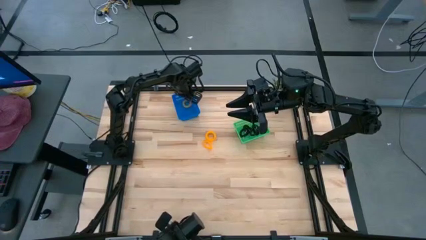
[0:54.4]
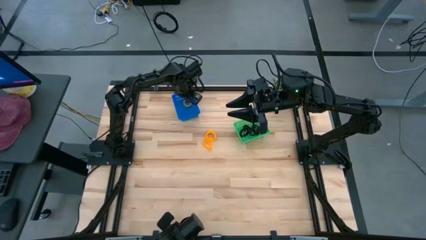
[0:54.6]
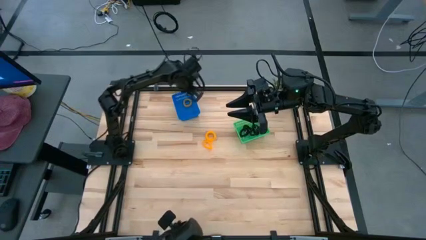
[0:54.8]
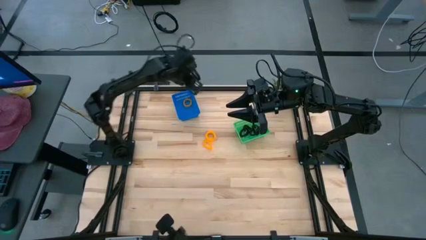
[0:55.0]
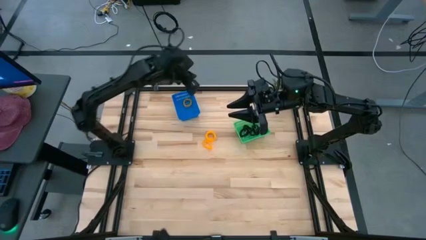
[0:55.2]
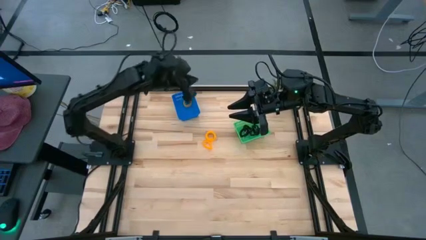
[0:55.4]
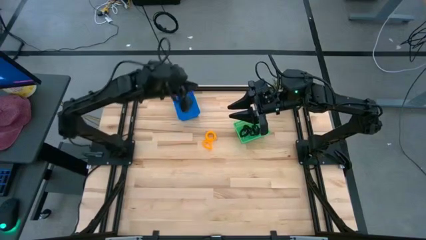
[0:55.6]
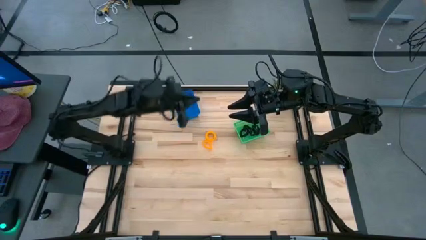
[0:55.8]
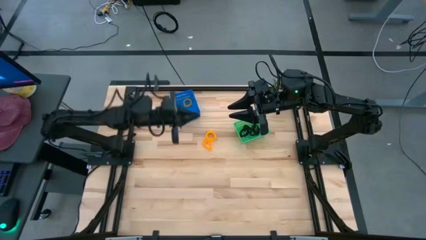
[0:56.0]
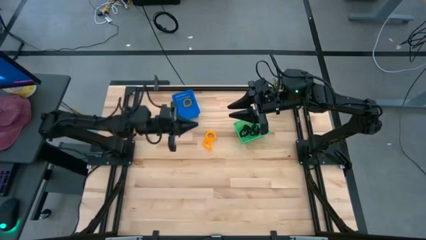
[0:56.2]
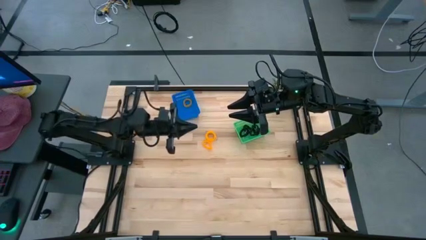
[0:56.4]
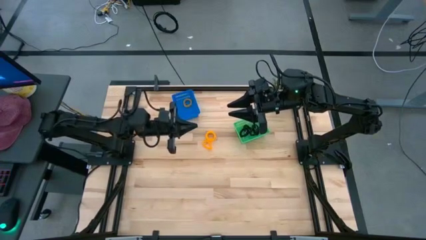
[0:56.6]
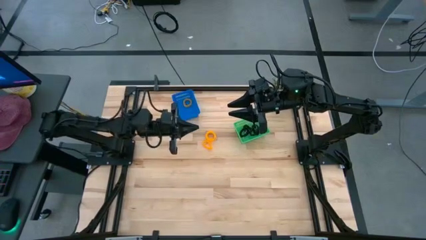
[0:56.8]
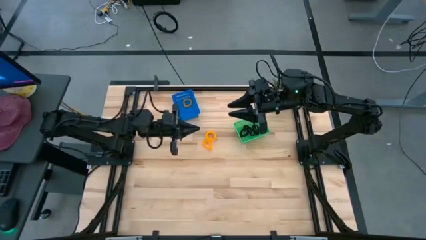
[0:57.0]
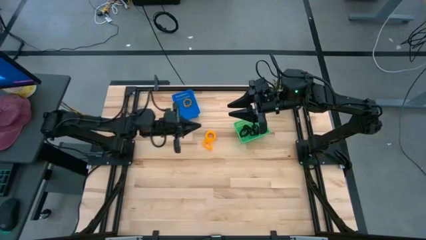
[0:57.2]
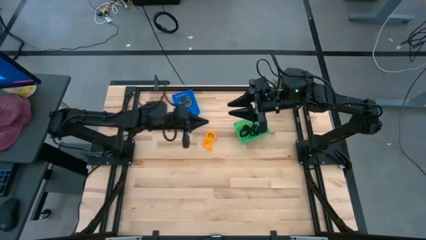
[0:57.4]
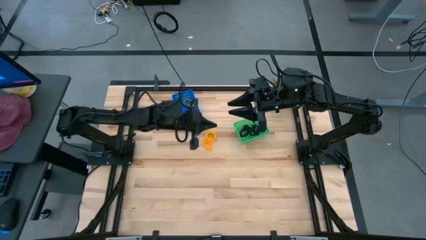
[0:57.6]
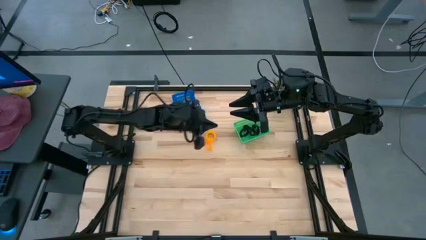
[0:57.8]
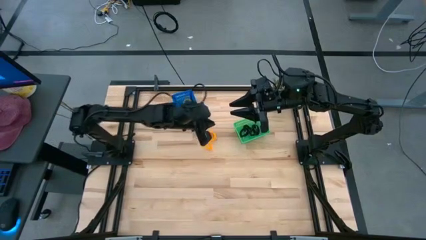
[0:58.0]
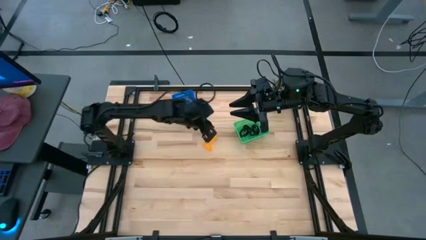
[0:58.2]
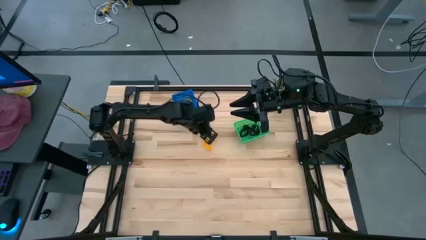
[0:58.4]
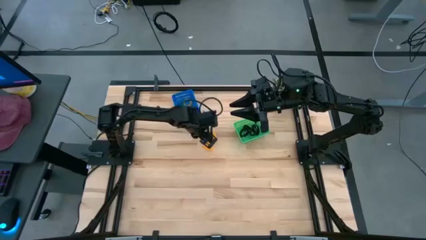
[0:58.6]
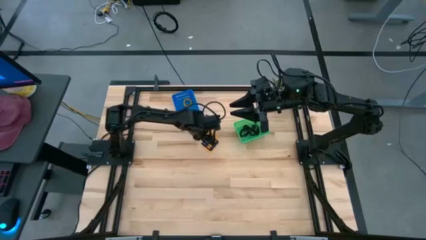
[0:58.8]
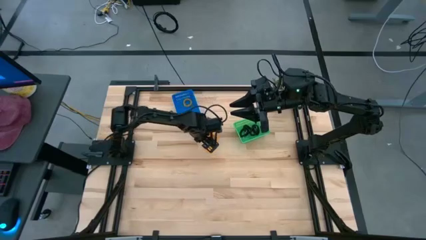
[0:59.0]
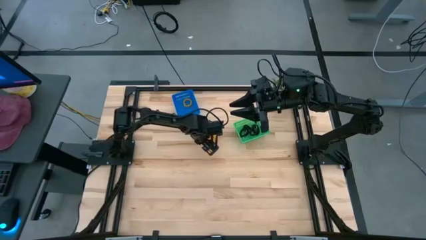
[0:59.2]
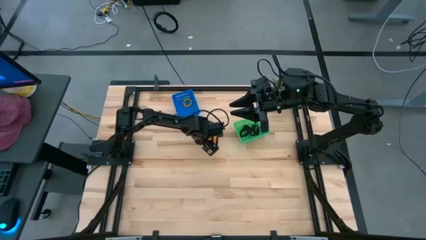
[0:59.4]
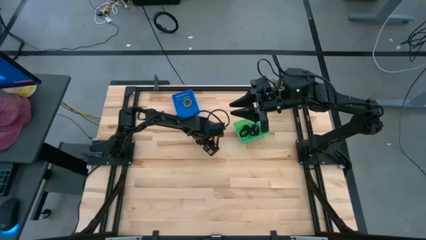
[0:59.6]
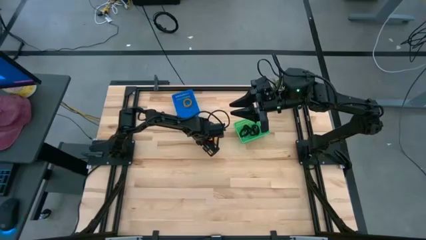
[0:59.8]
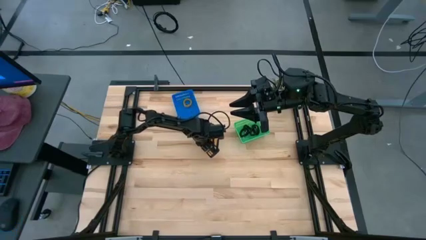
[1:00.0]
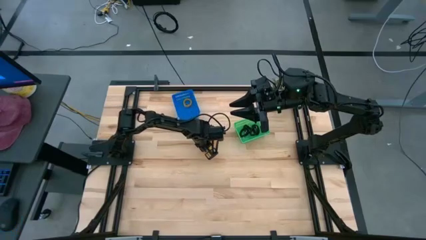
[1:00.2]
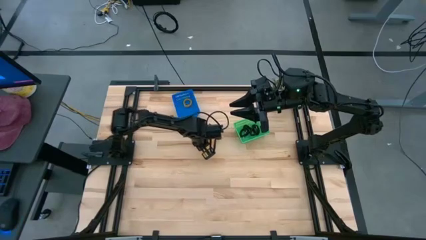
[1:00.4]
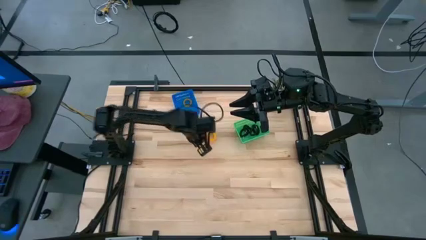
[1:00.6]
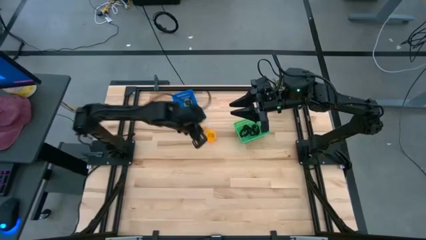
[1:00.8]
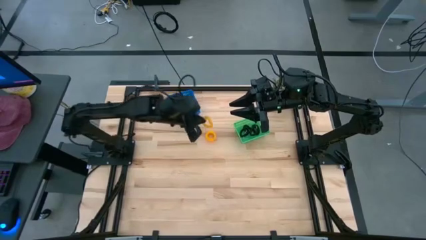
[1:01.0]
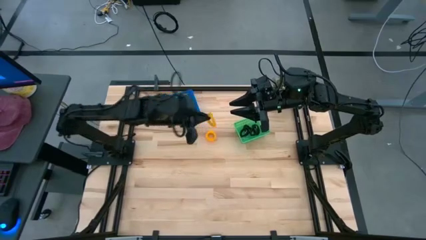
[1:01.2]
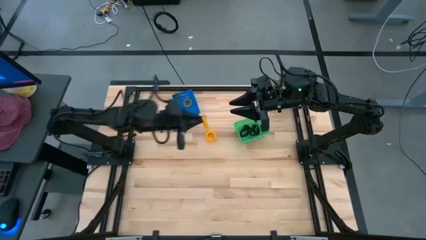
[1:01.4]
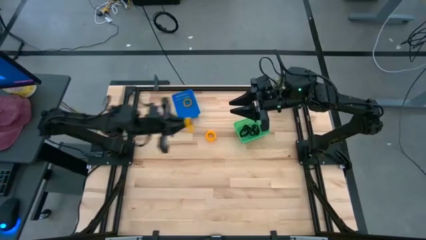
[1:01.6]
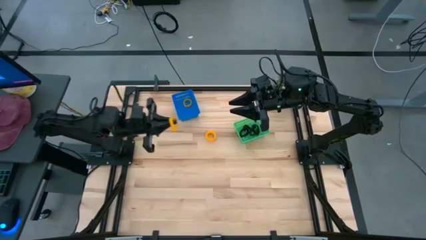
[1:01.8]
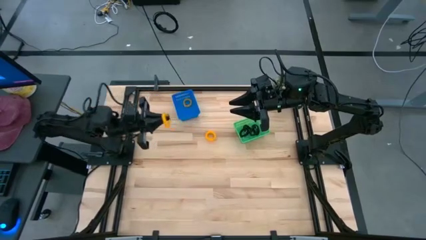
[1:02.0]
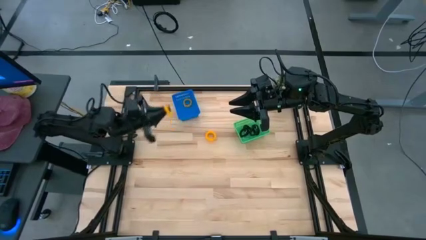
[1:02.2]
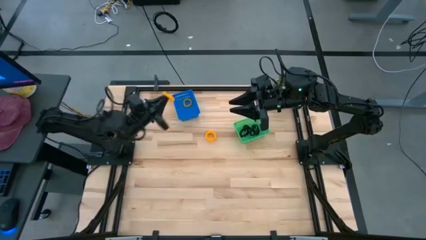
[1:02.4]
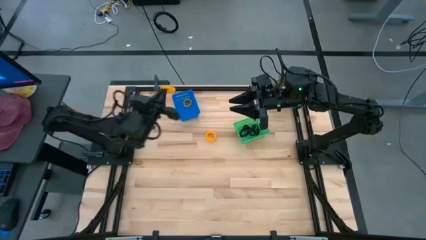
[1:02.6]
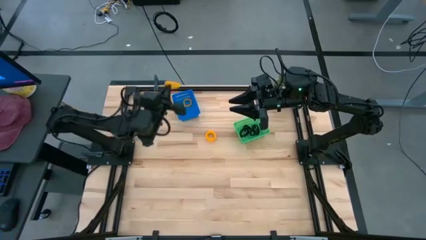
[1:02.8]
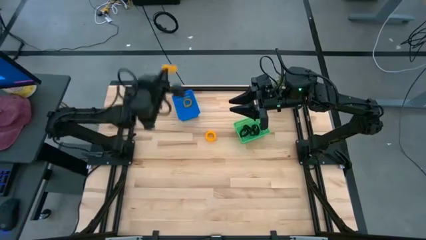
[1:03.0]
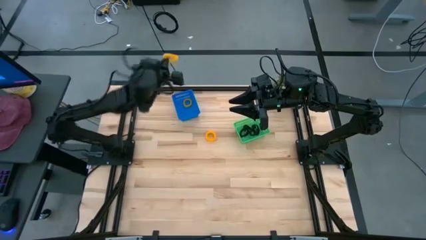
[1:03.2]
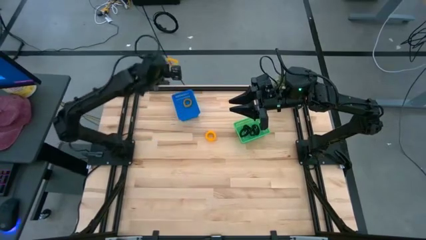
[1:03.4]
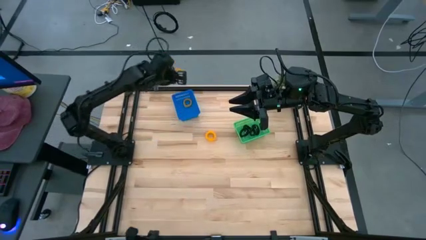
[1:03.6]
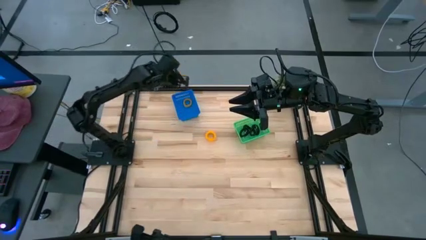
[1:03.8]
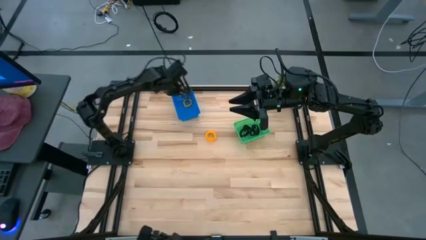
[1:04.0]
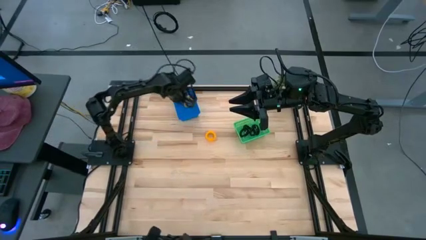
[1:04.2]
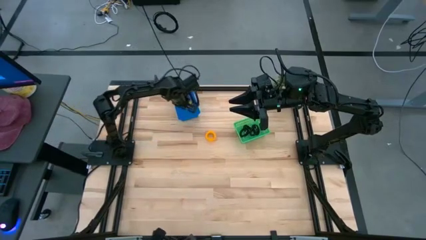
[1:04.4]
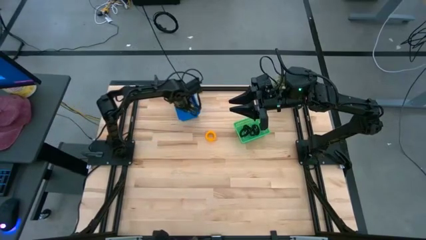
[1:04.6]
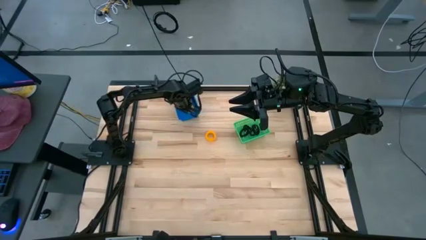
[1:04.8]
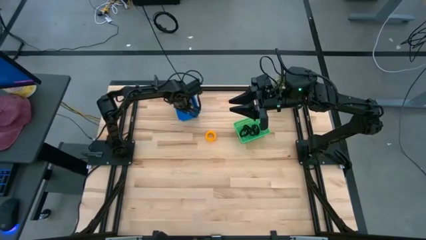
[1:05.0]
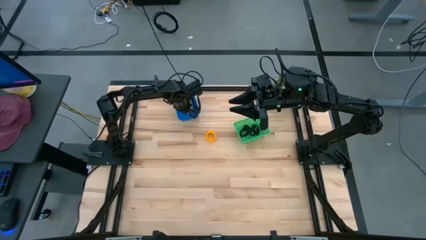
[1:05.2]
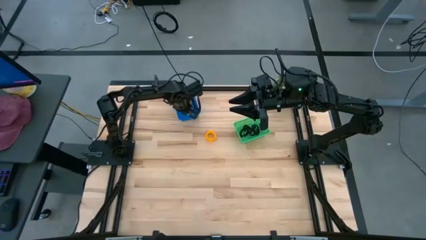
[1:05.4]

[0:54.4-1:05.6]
Task: Sort spring keychains
Put the yellow spring keychain into the blue bin
